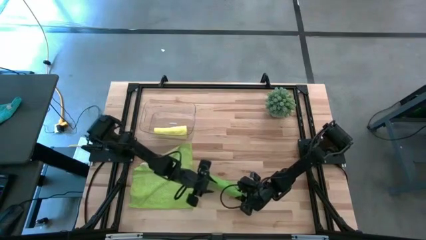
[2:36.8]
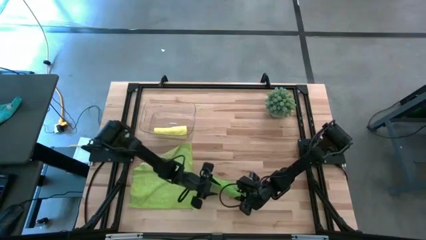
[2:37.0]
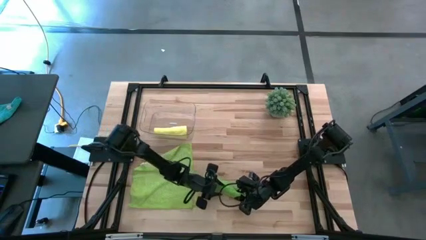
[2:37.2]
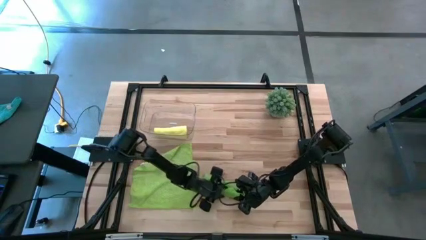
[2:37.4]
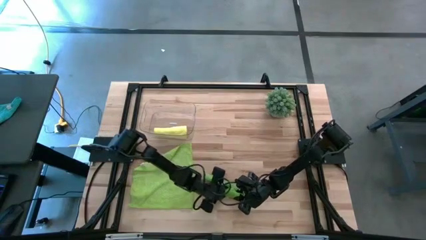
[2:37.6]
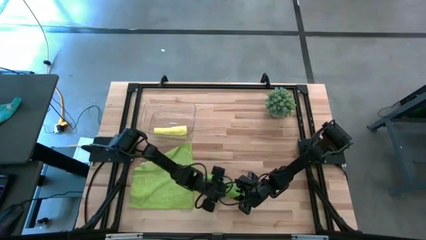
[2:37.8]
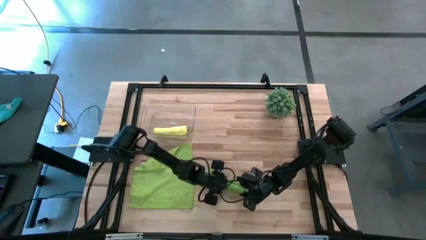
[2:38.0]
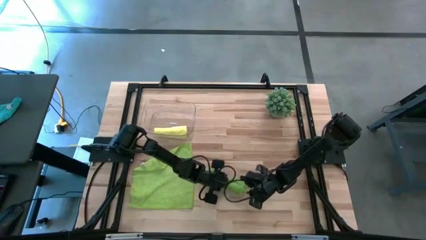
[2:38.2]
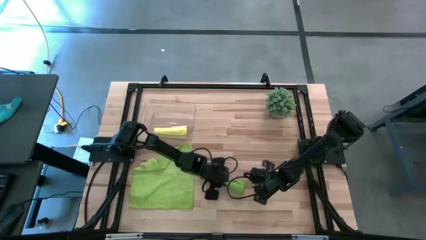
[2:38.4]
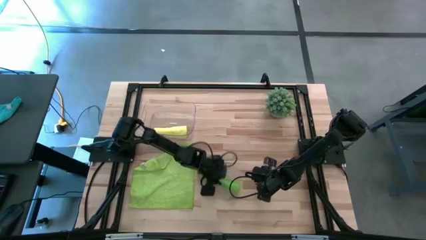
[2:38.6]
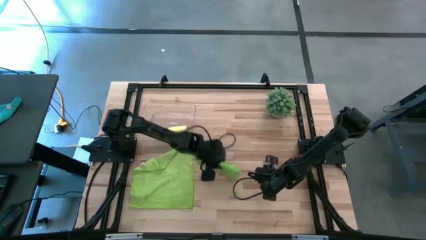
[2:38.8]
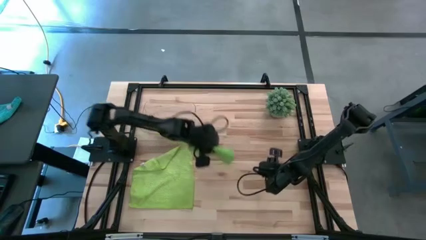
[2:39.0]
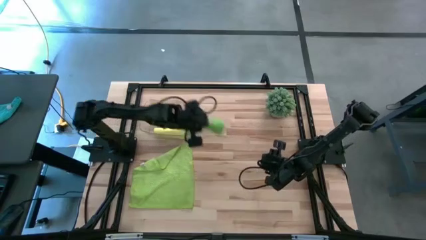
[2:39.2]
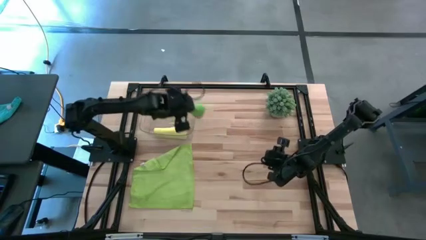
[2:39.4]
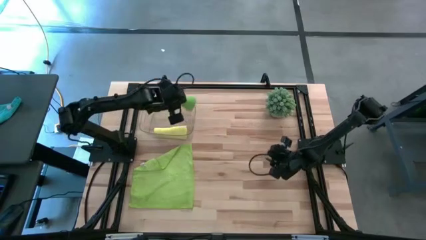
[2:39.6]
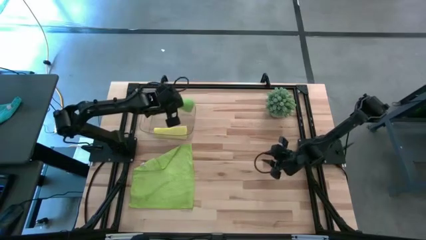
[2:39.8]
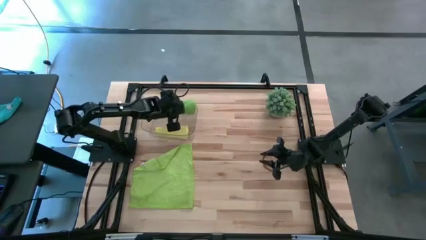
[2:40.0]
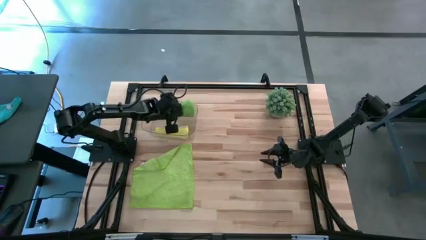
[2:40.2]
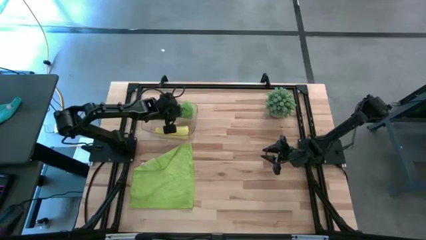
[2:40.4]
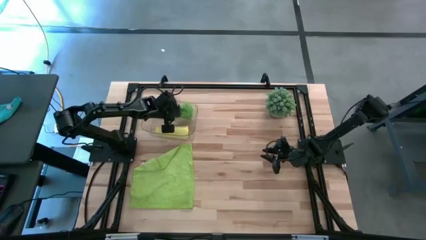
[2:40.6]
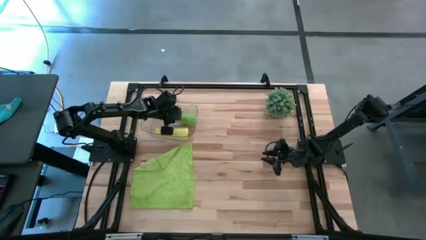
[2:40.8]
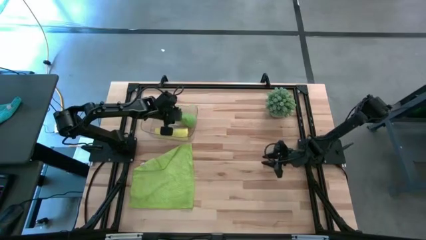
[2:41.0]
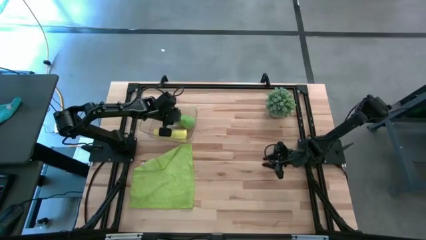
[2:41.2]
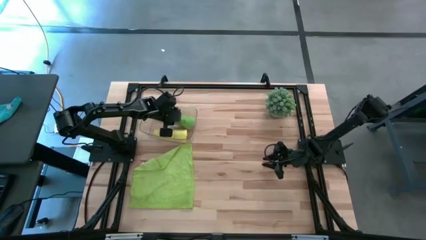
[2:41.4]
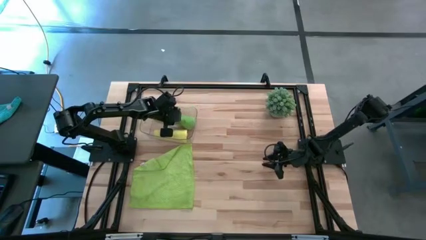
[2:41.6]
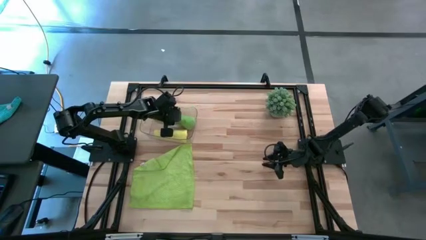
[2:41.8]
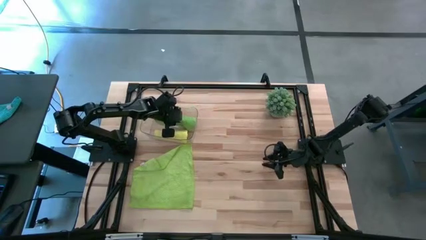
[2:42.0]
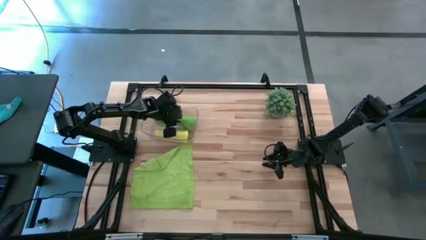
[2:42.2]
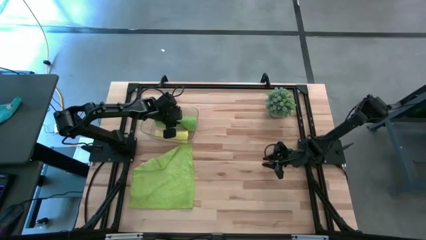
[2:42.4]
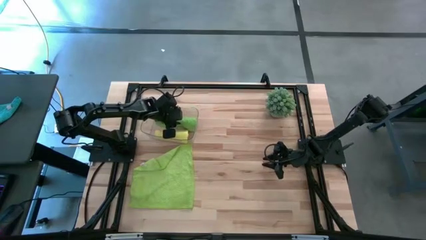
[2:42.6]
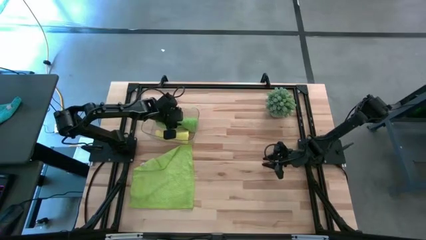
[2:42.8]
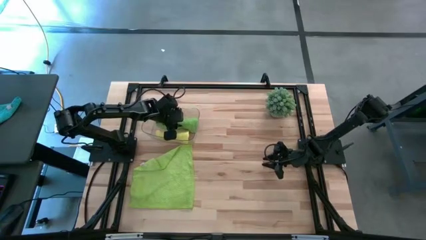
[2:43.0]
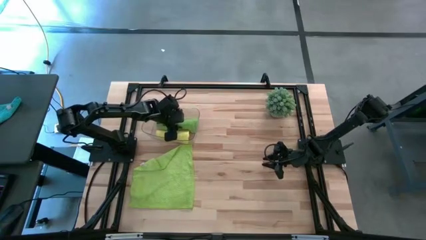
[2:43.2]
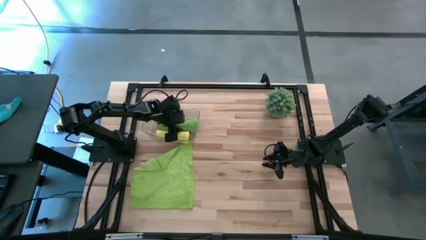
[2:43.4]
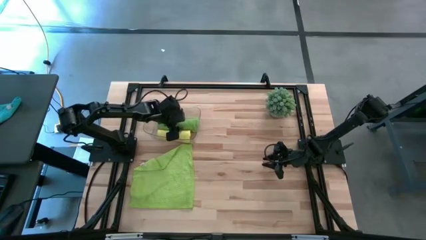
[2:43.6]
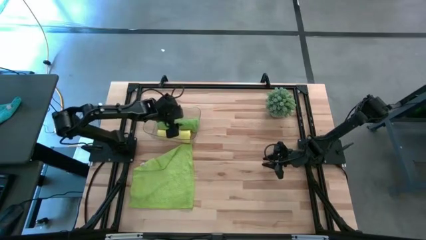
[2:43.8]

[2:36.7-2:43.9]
Task: Roll microfiber towels into tight, uniform cylinder then place into a basket
Put the right green towel into the transparent bin

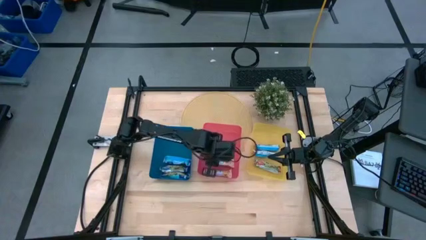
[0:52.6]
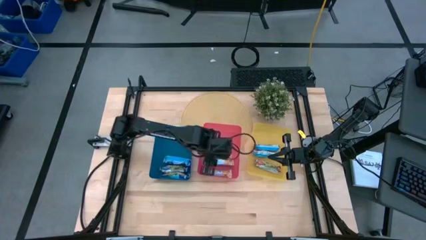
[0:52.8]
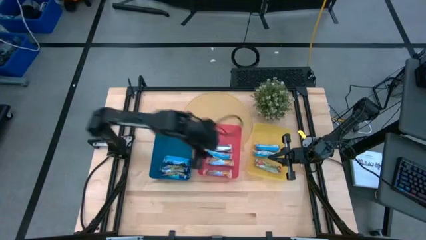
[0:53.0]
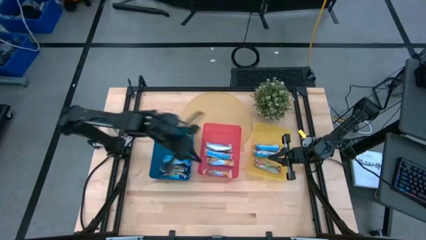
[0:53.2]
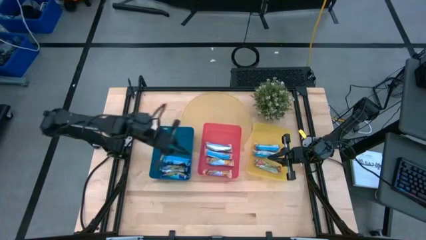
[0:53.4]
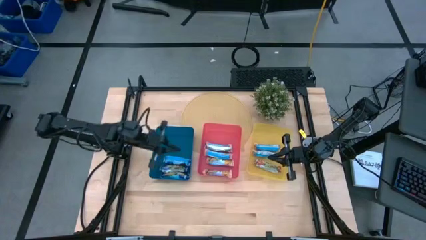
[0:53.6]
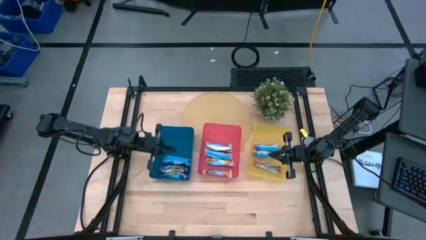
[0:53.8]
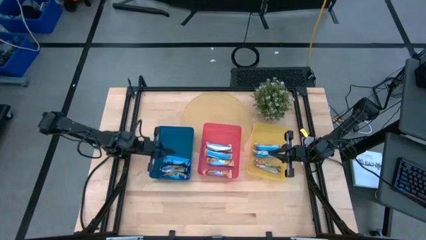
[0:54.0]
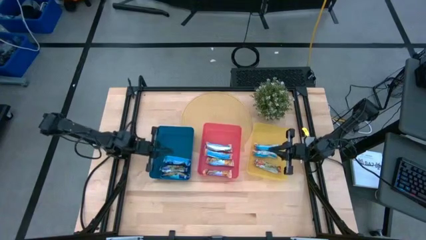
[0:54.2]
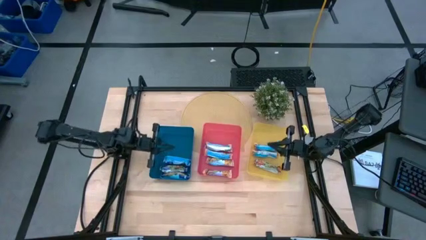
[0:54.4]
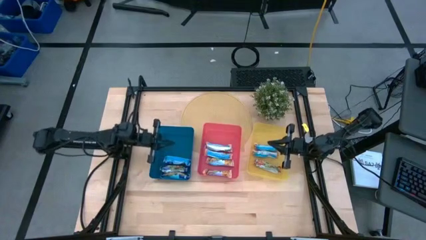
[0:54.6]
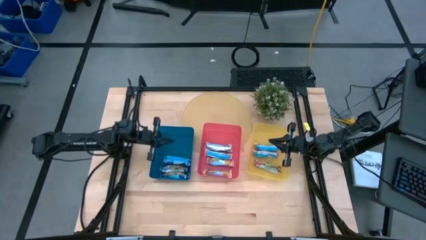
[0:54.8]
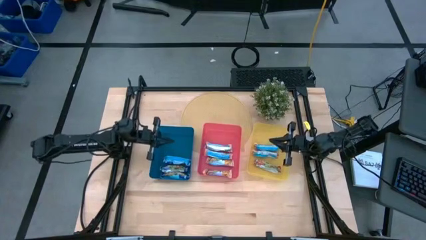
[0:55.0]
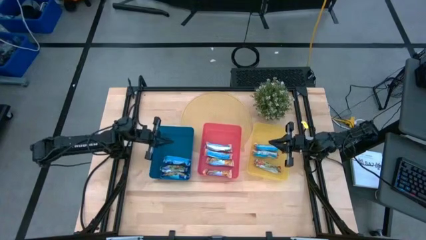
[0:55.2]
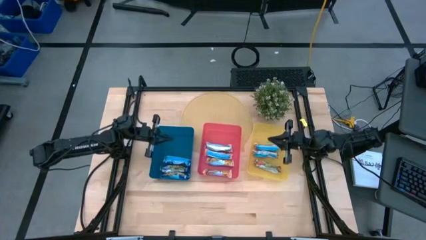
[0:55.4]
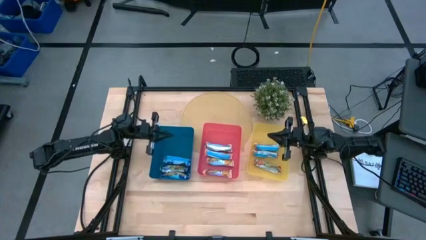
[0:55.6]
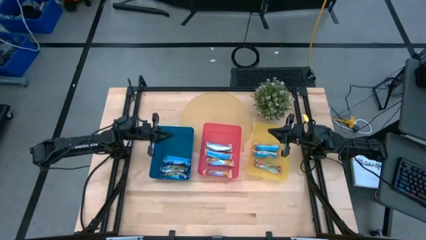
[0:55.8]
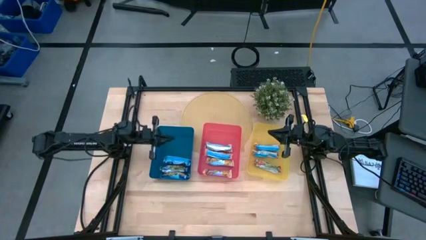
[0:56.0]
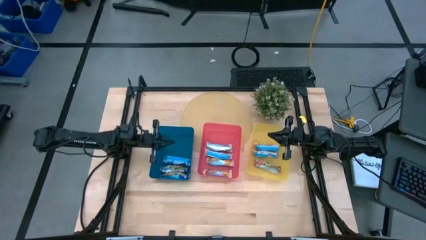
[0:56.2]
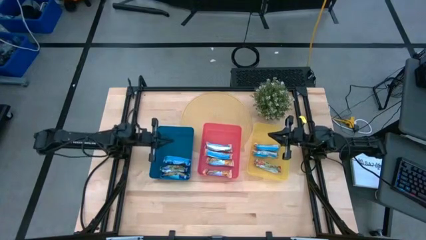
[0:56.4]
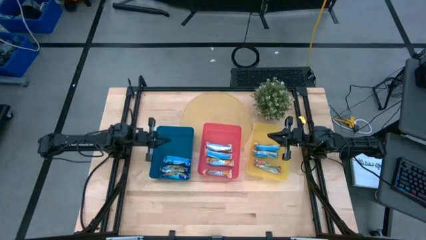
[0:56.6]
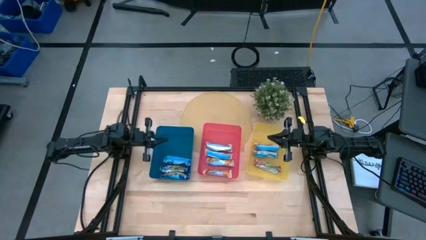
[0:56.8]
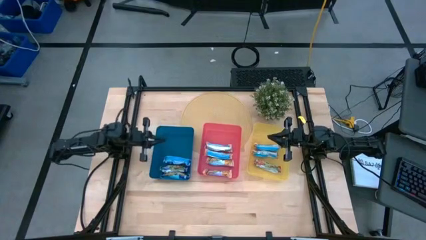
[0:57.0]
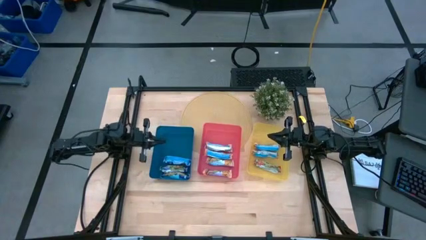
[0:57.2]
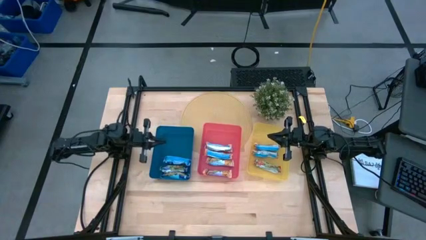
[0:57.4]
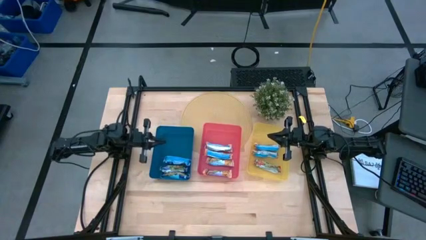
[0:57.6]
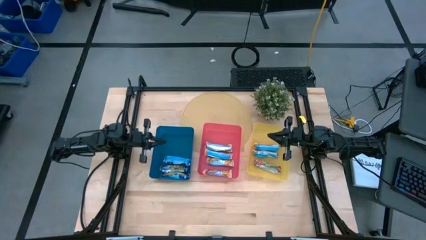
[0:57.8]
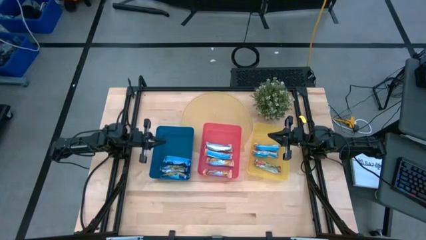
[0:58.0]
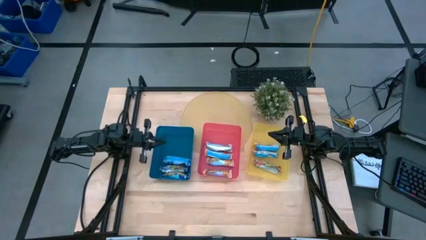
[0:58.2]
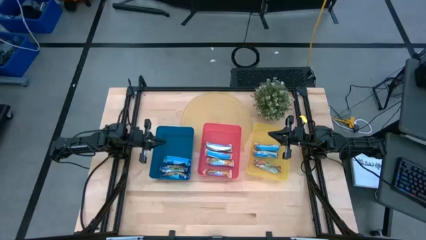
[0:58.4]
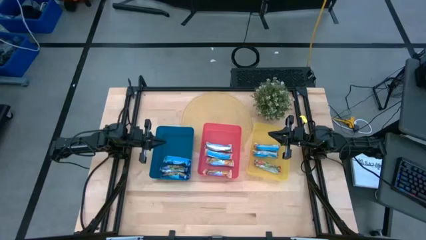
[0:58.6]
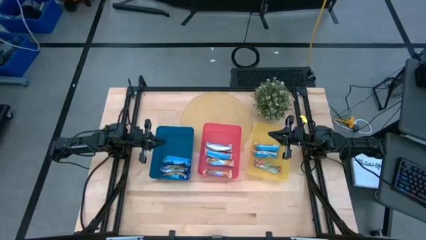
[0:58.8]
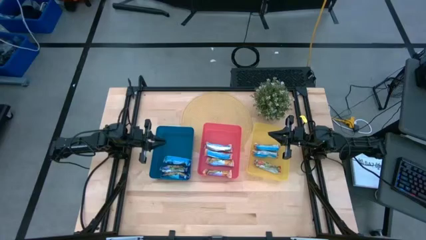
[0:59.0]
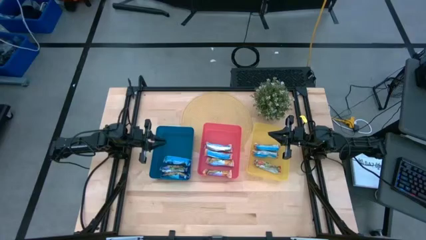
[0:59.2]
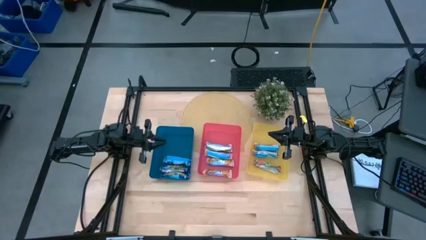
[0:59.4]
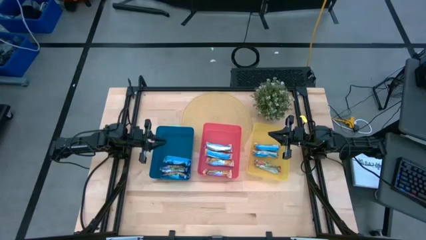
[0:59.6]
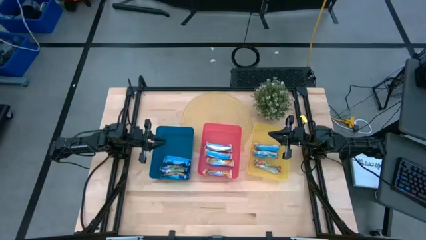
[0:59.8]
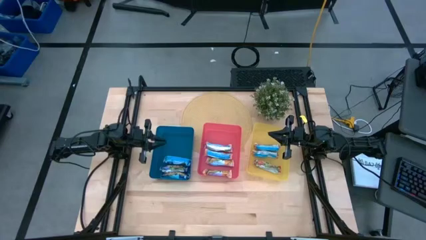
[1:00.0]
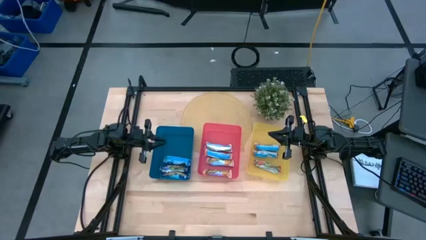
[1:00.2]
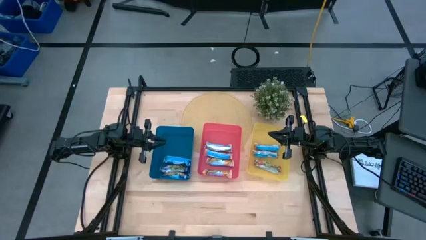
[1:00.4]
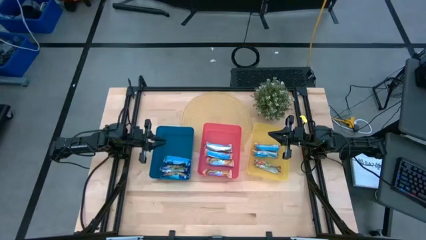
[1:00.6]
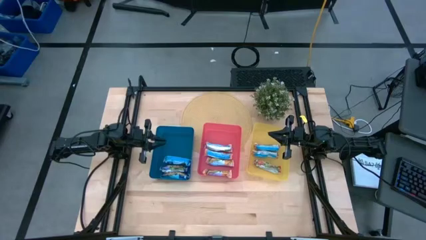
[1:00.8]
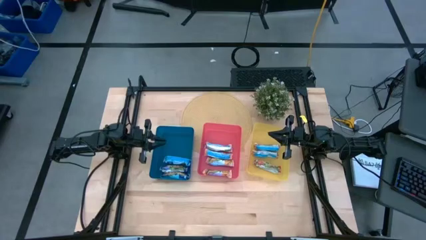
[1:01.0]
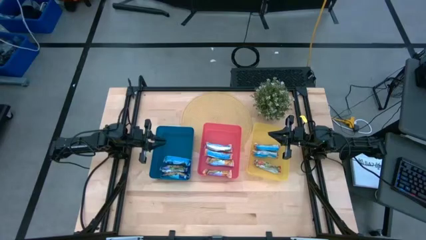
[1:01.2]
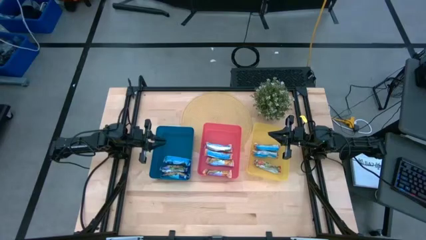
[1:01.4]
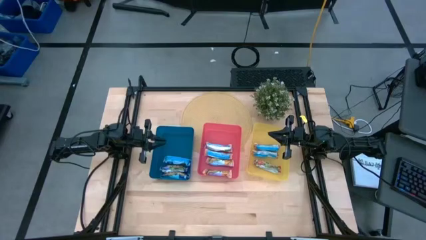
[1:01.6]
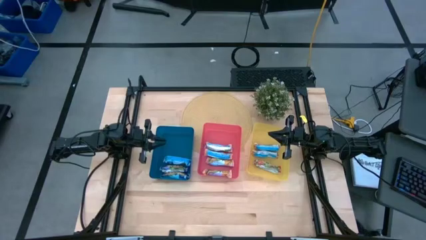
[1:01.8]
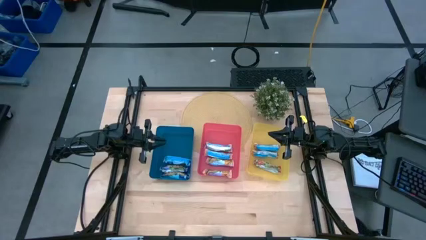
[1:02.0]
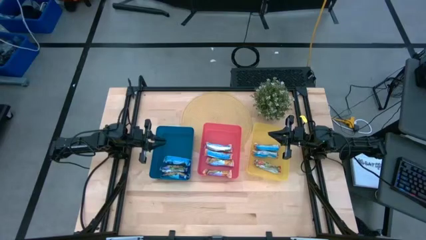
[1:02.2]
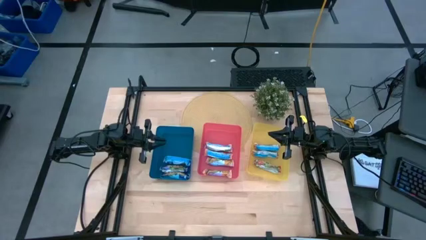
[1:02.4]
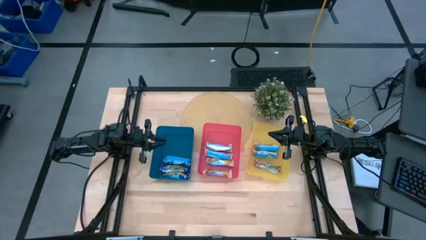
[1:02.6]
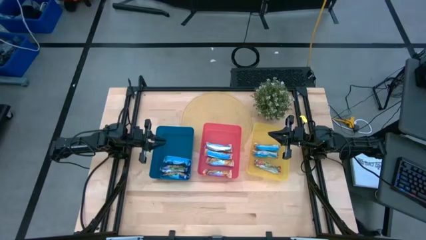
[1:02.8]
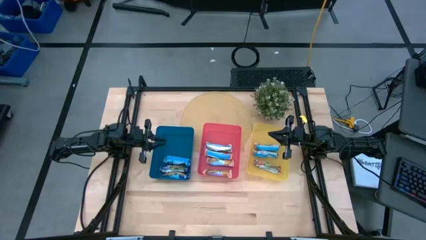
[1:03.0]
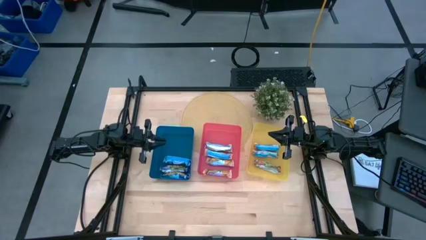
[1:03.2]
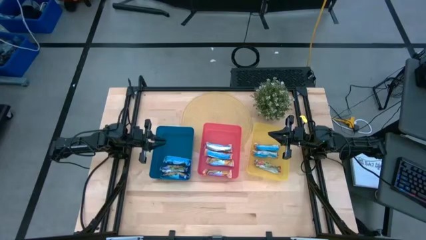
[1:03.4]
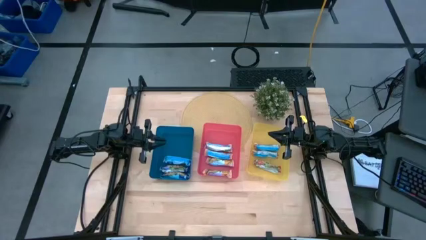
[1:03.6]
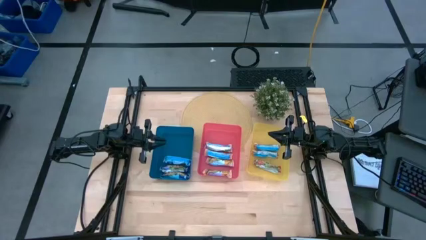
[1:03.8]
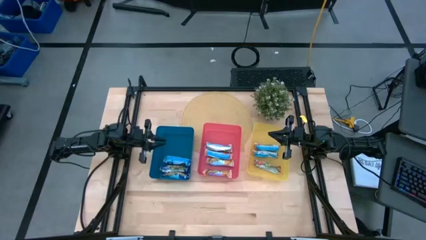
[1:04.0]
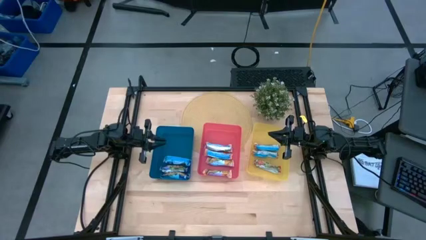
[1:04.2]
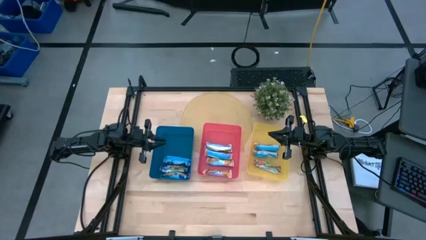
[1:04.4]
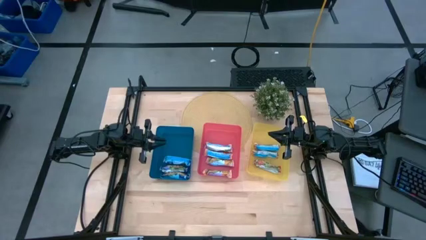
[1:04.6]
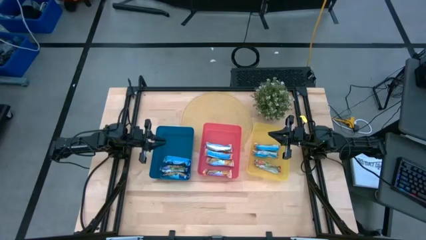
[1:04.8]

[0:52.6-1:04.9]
Task: Pick and place Granola Bars by type
Return to Home Position
